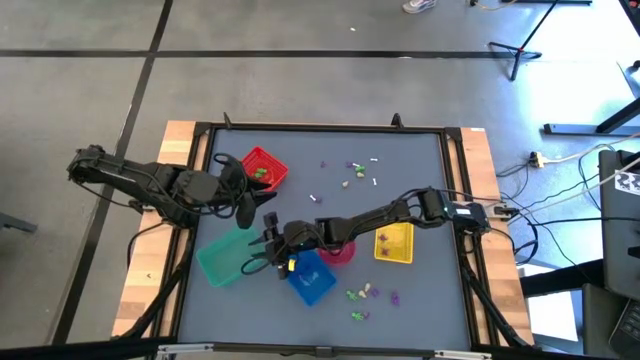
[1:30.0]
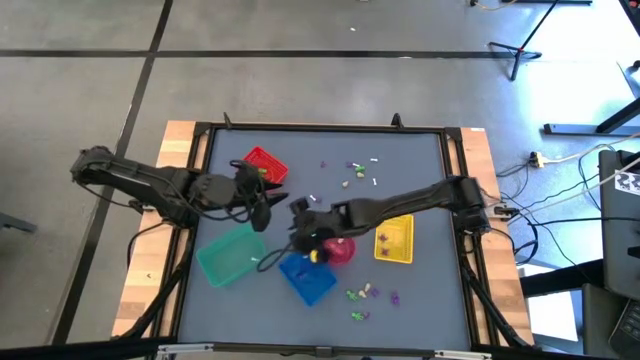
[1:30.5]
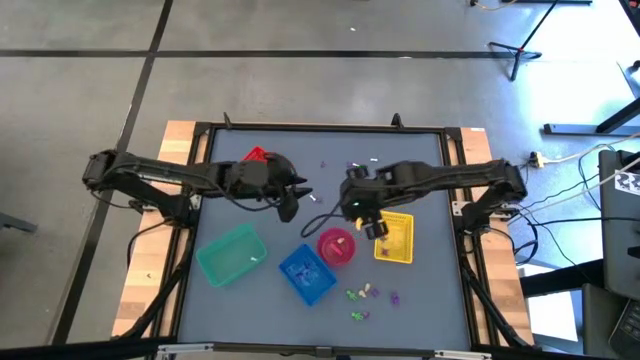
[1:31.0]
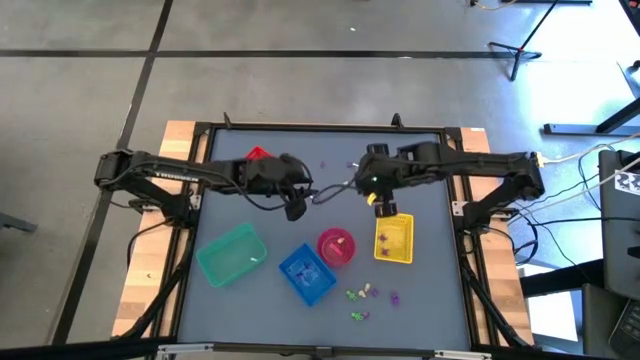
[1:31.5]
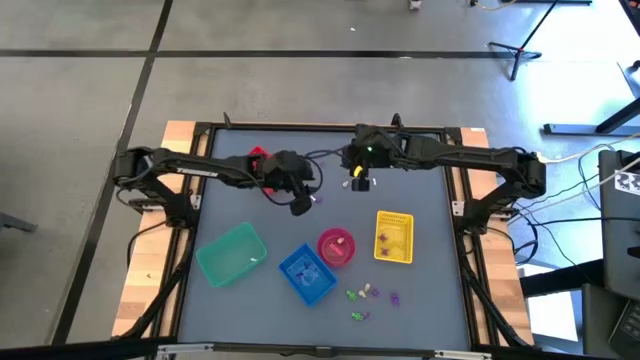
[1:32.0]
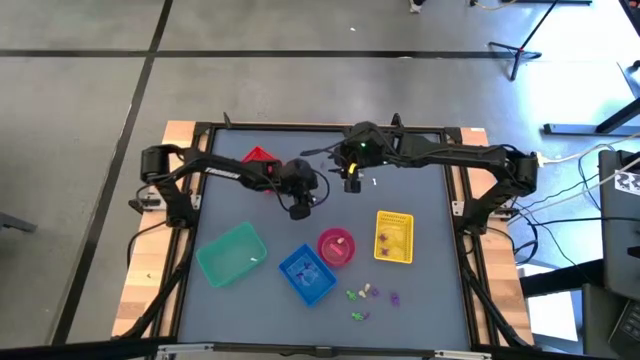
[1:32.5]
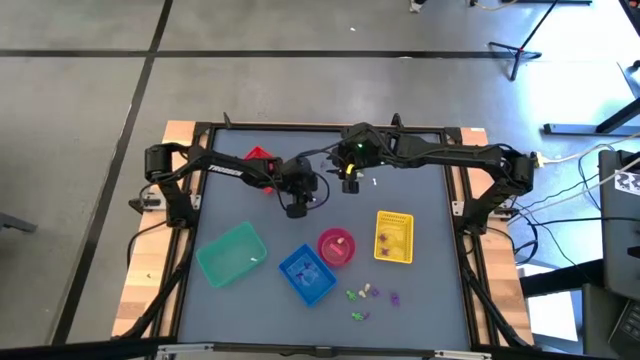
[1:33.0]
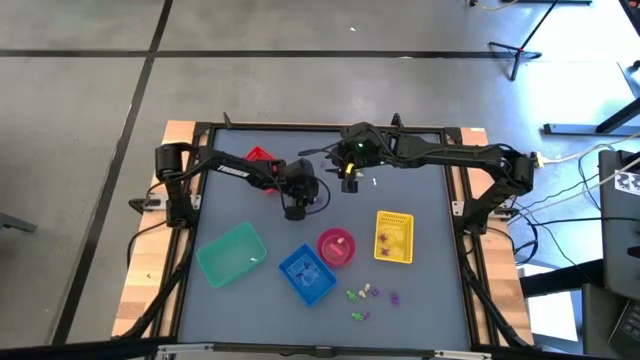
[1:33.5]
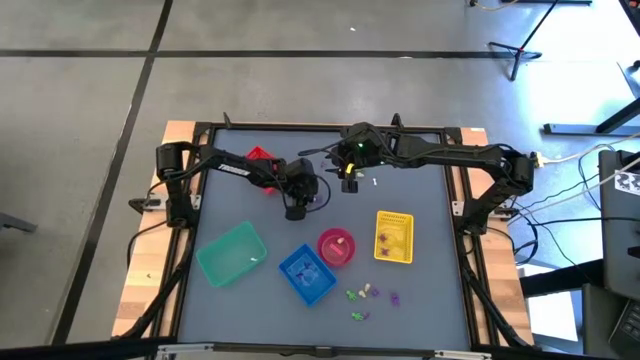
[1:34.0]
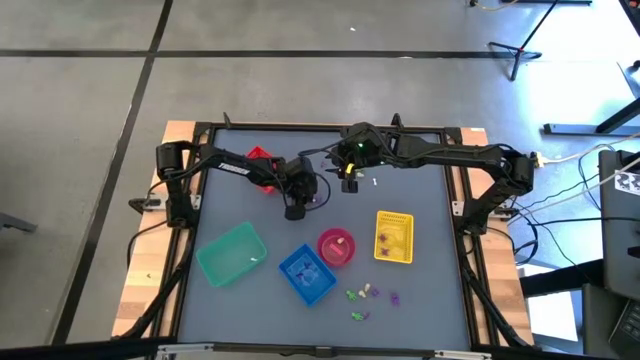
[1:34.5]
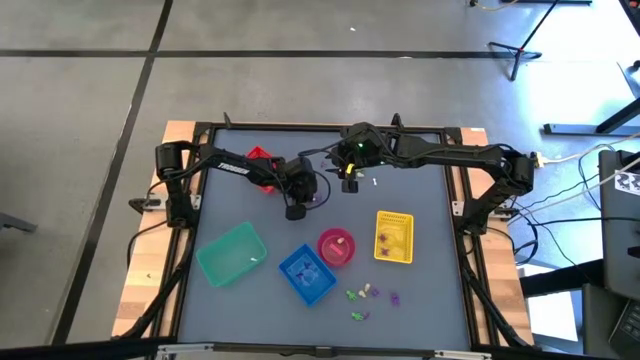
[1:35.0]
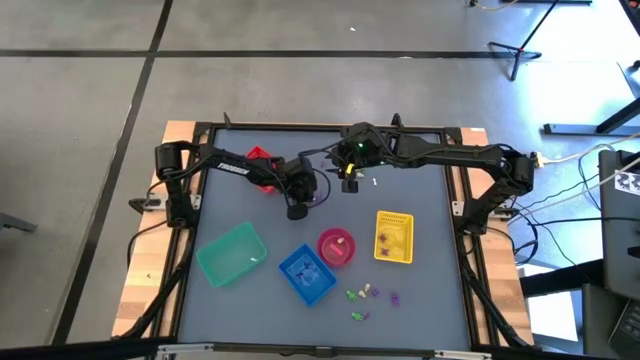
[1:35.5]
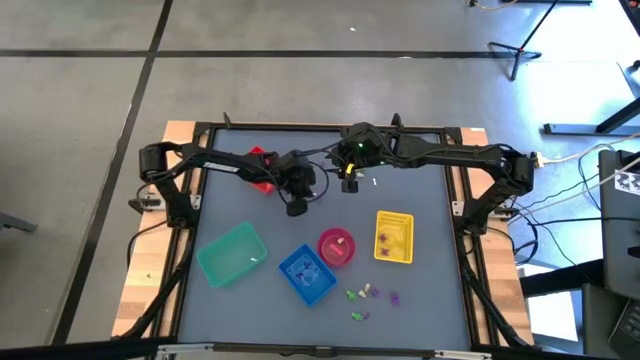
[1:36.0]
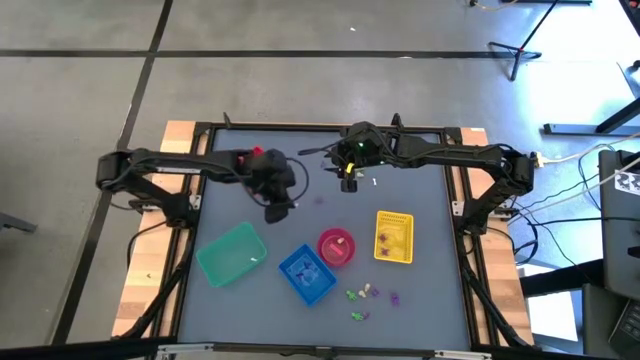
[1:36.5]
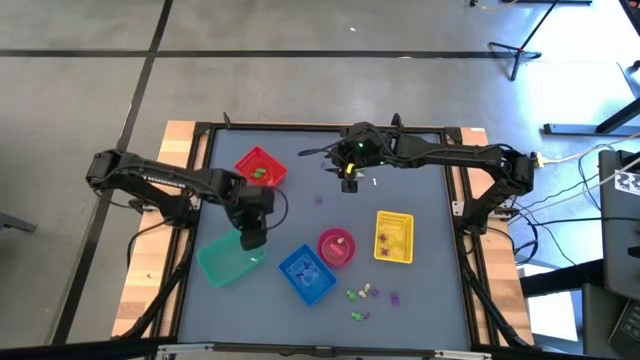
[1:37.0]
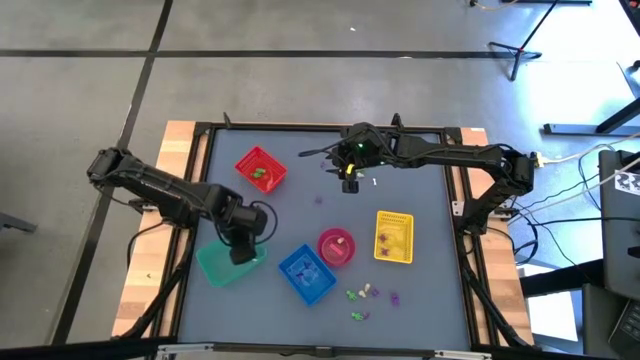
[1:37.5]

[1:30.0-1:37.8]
Task: Sort Halloween decoration
Put the white bone toy into the green bin

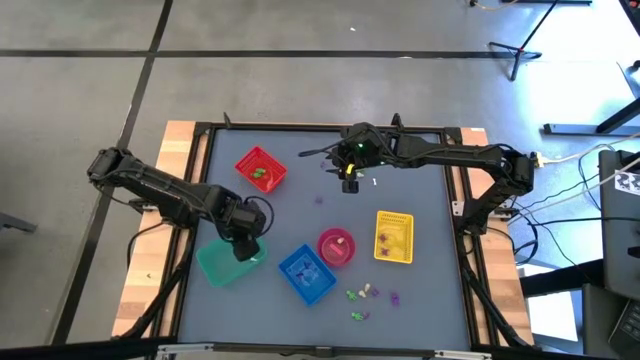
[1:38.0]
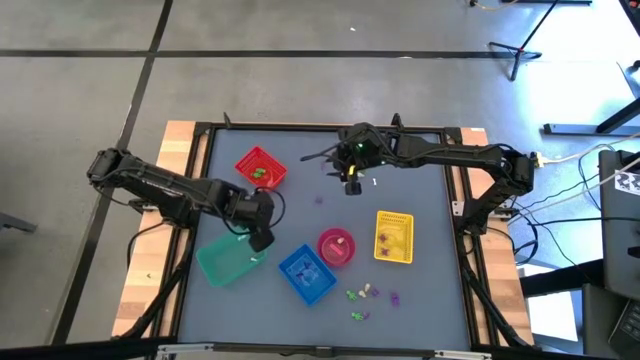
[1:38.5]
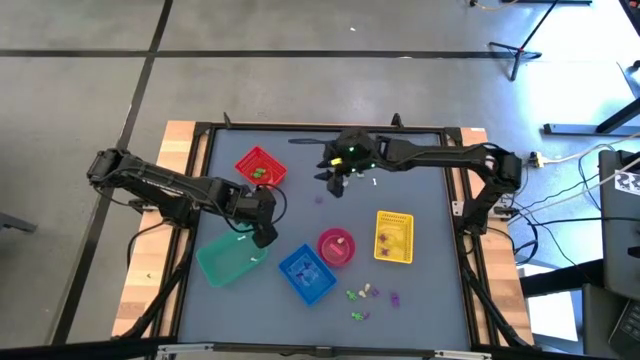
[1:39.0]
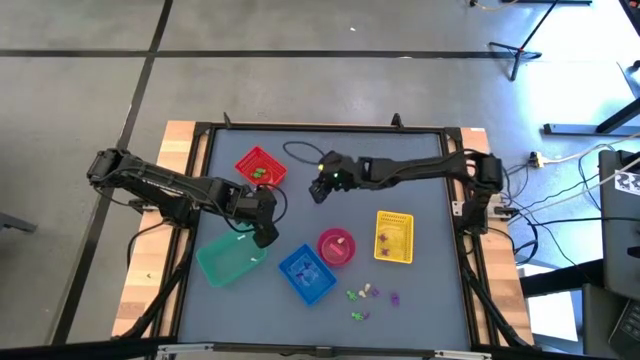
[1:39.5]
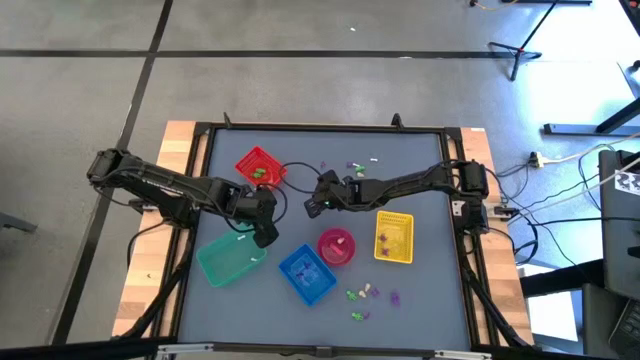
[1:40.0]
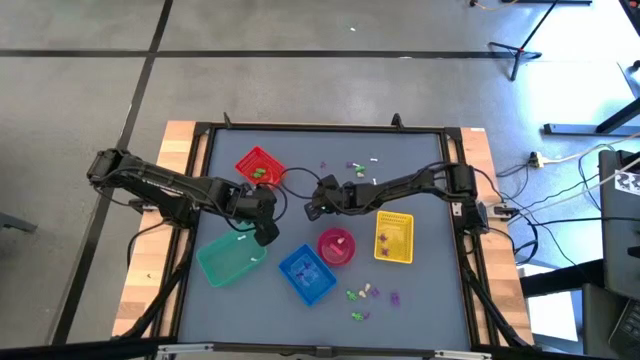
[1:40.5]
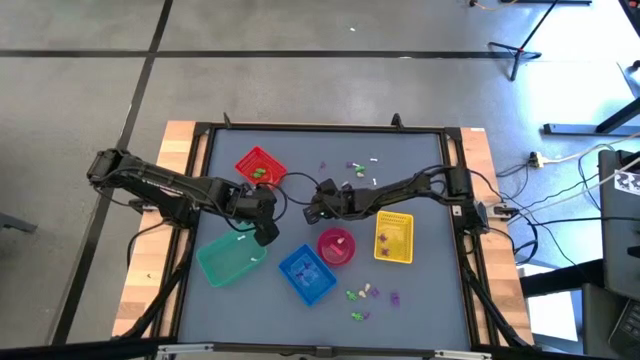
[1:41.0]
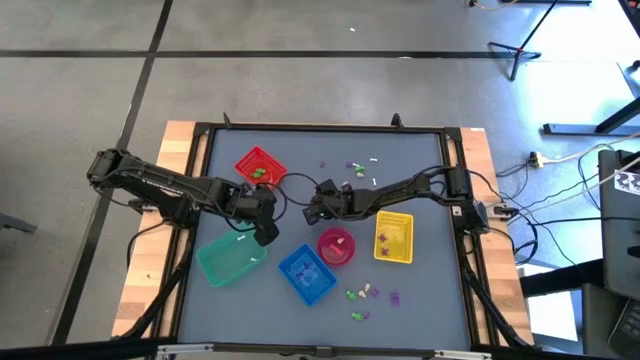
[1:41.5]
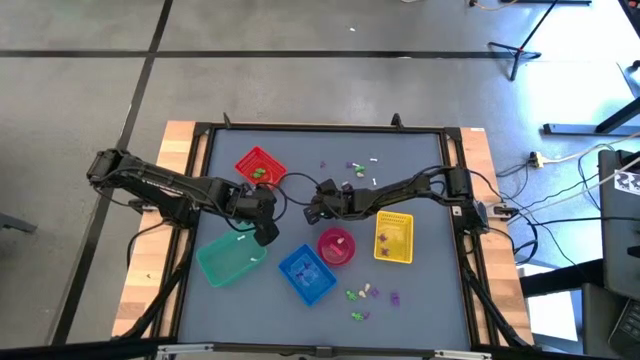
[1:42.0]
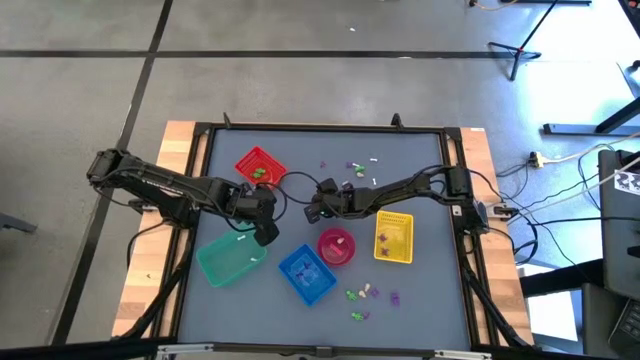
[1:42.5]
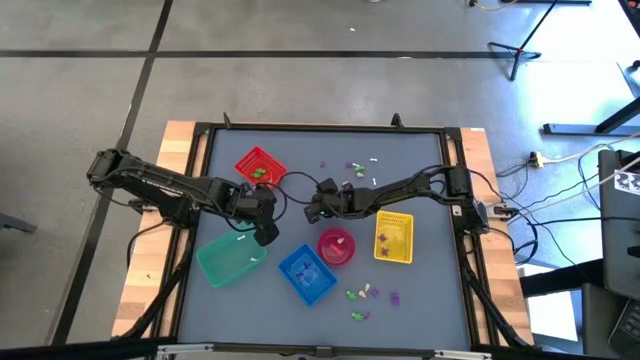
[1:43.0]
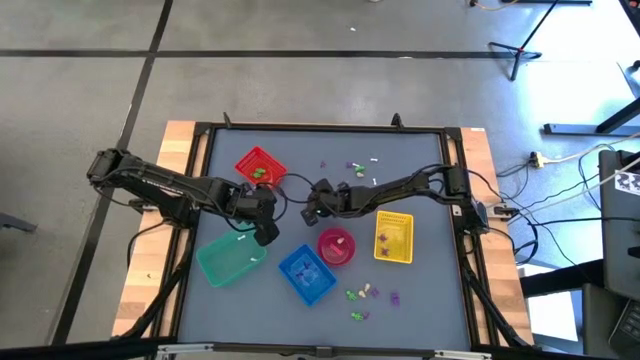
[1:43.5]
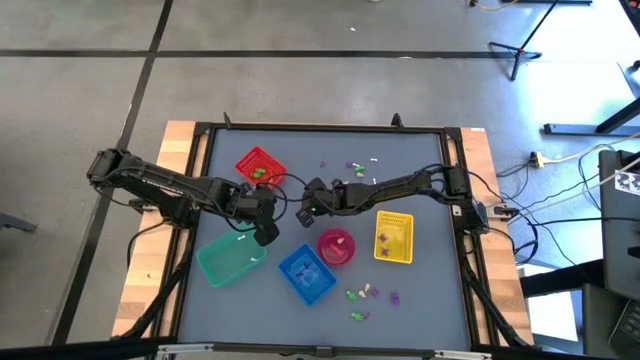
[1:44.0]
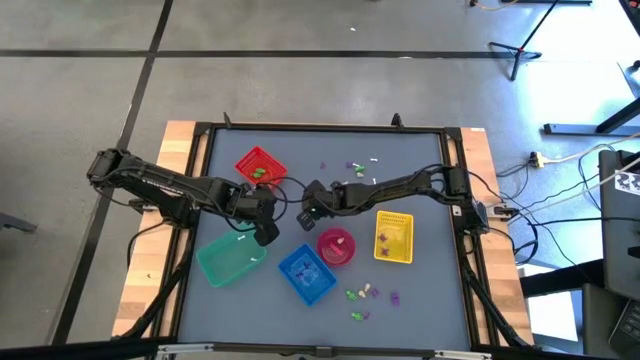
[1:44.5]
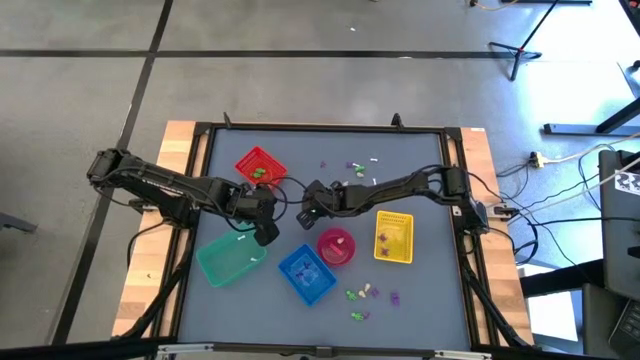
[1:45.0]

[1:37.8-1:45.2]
Put the violet spider toy into the yellow bin

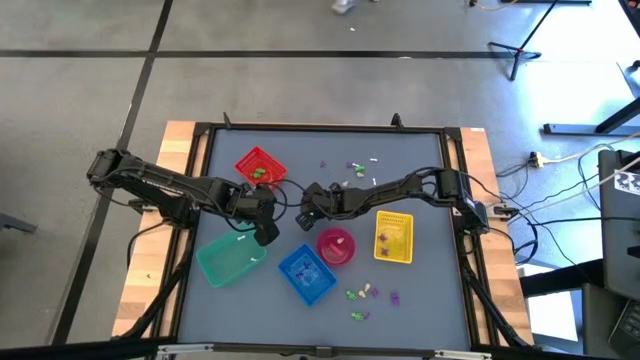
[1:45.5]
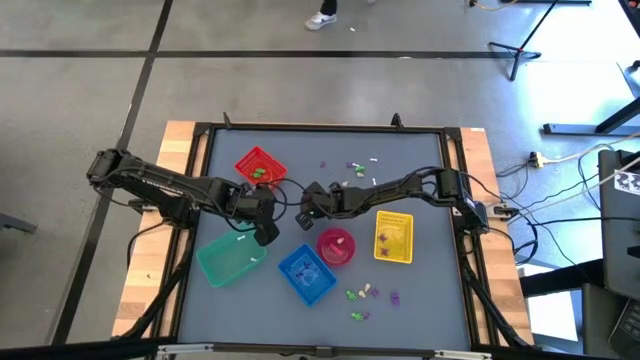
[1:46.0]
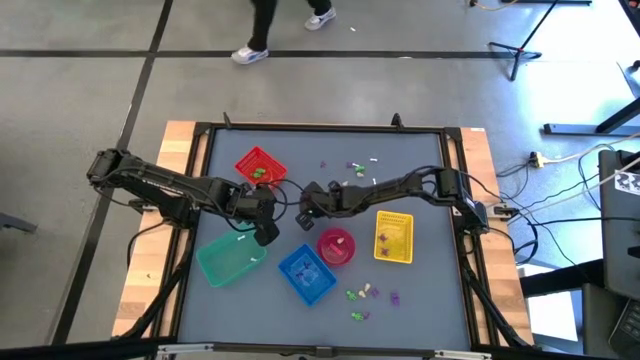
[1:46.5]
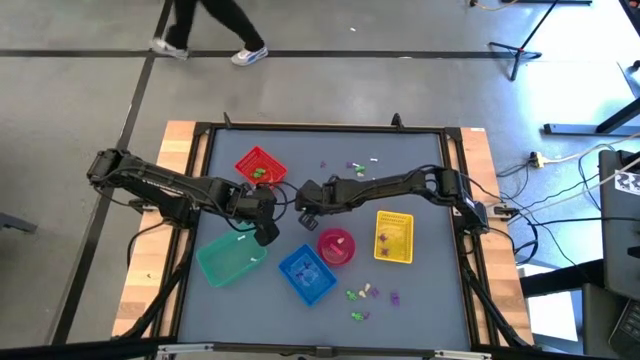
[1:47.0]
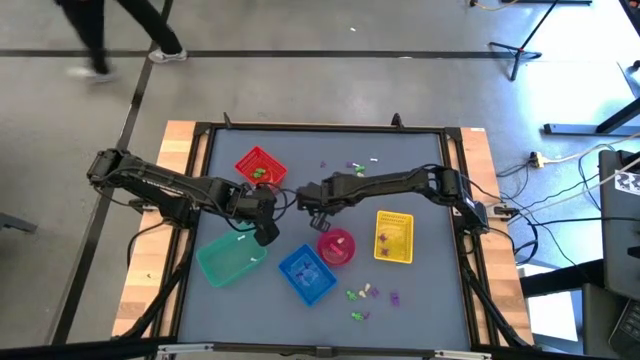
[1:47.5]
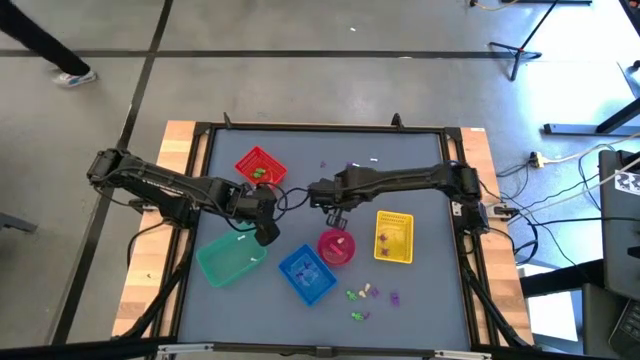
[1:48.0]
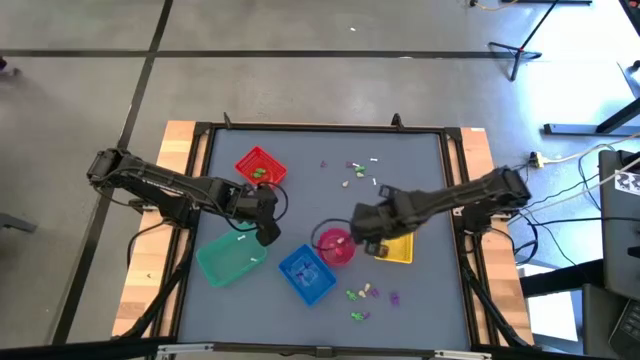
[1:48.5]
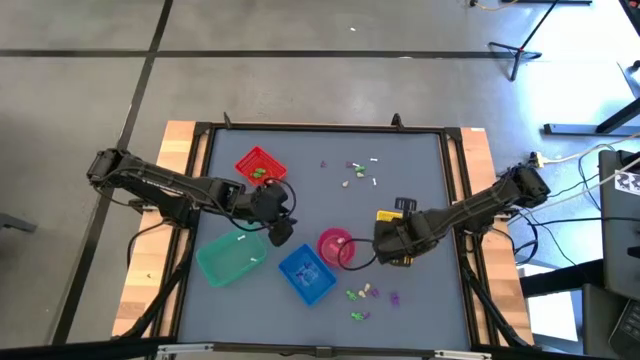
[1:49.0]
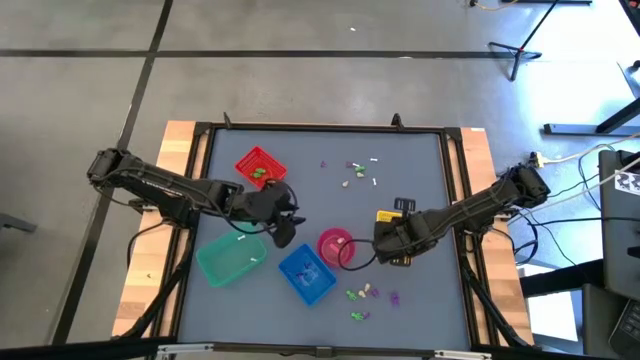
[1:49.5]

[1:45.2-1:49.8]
Put the violet spider toy into the yellow bin

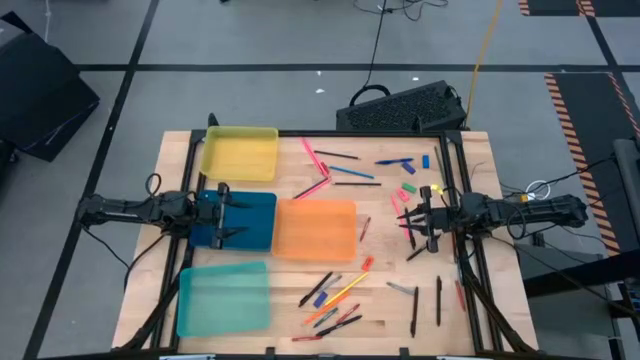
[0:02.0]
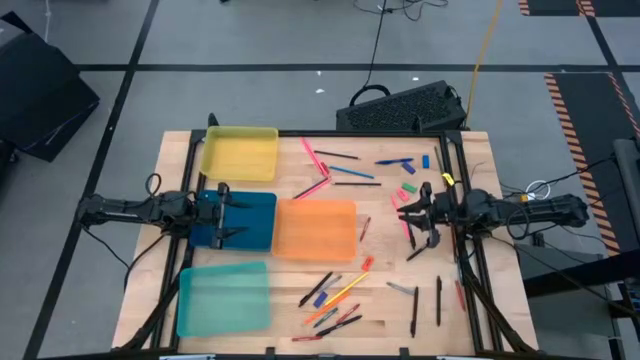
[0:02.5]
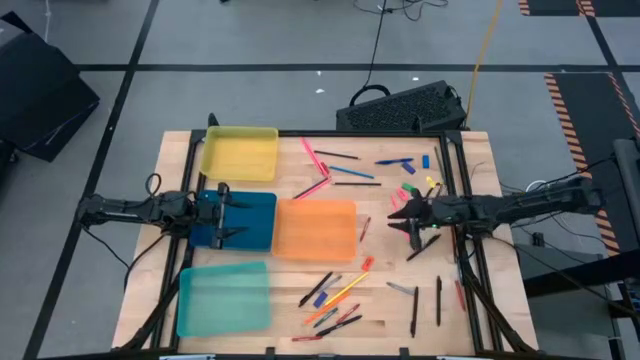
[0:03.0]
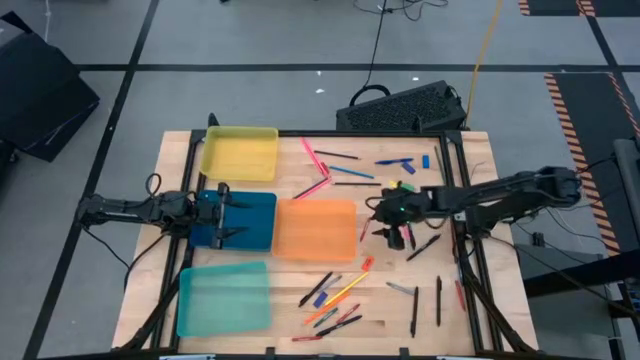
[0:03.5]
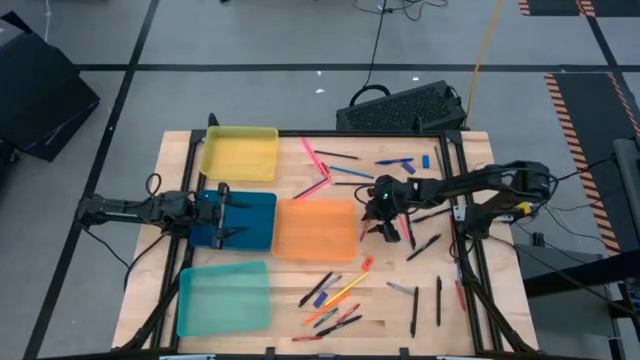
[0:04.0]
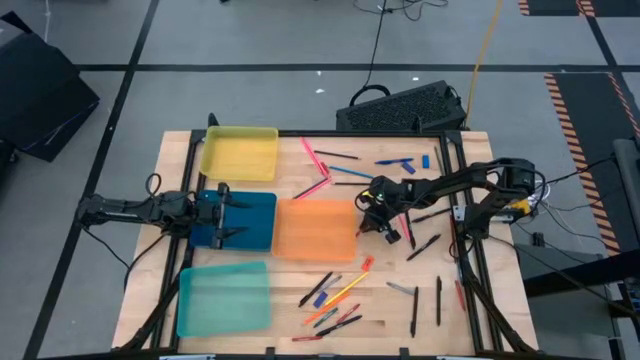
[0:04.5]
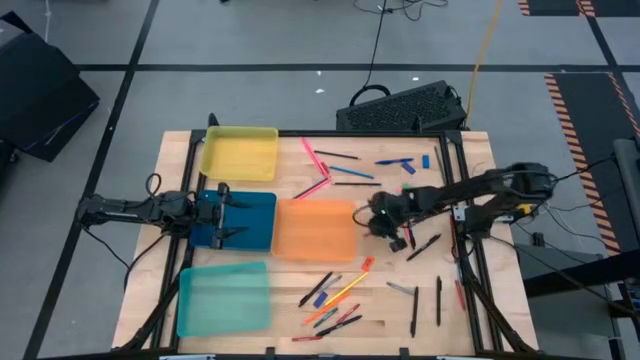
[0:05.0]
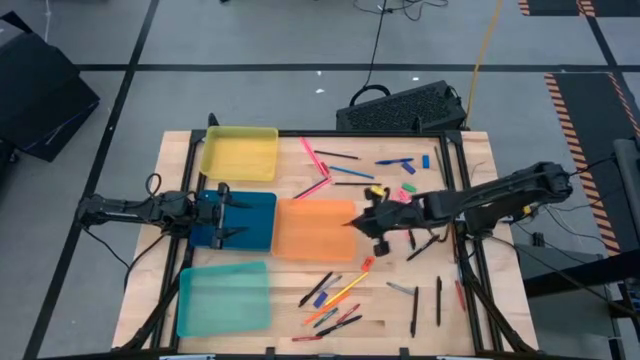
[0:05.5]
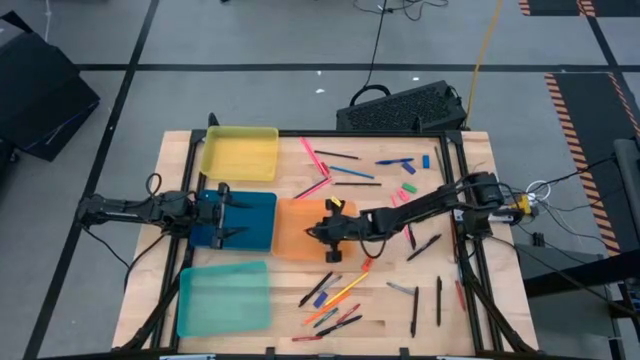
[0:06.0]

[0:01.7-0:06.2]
Task: Sort crayons/erasers/pens/pencils in bins
Put the red crayon into the orange bin
